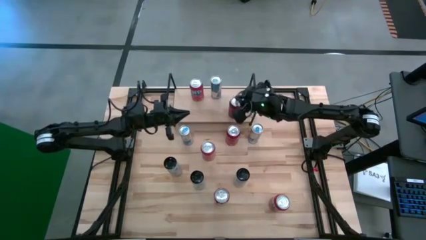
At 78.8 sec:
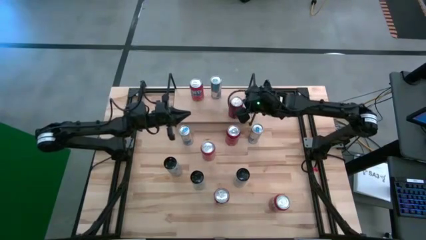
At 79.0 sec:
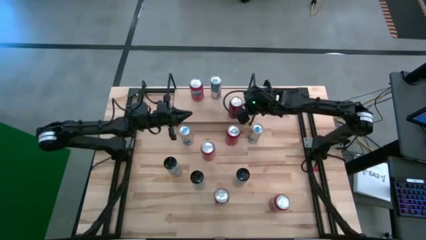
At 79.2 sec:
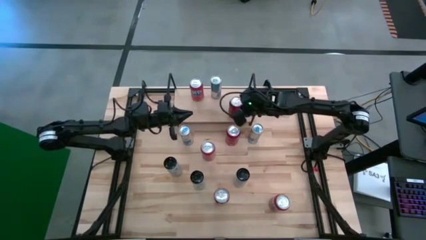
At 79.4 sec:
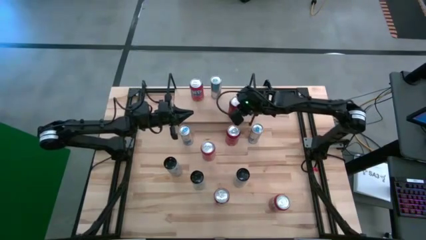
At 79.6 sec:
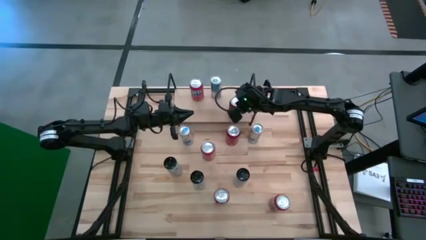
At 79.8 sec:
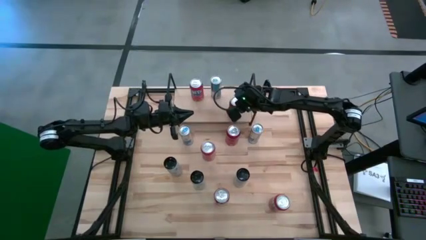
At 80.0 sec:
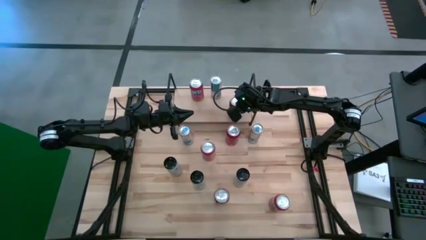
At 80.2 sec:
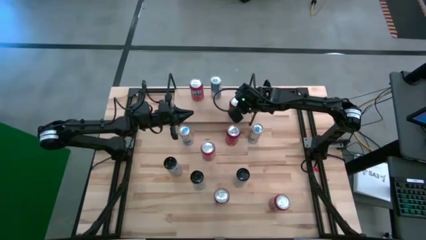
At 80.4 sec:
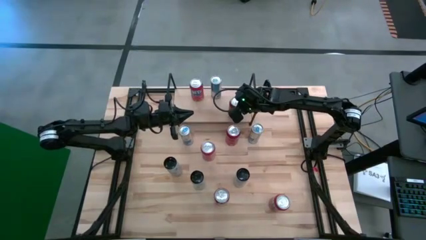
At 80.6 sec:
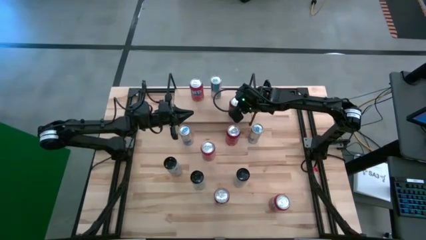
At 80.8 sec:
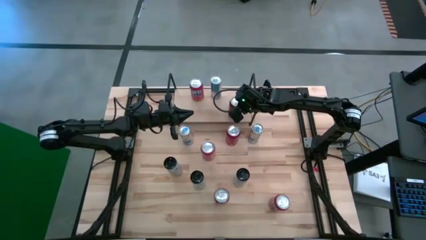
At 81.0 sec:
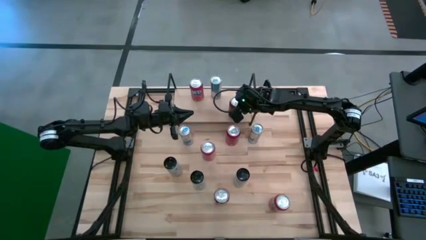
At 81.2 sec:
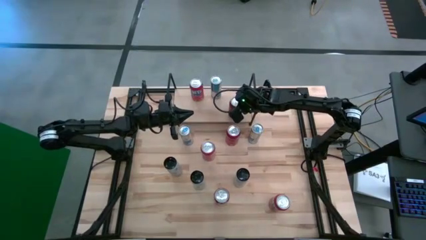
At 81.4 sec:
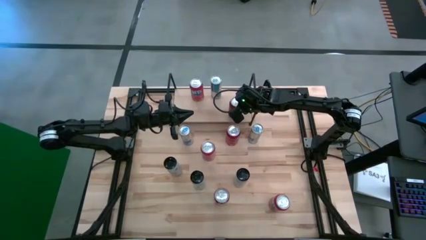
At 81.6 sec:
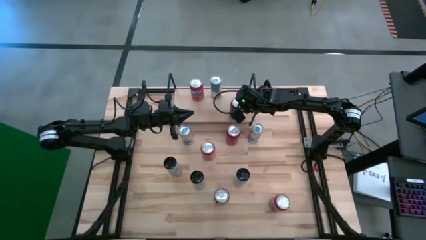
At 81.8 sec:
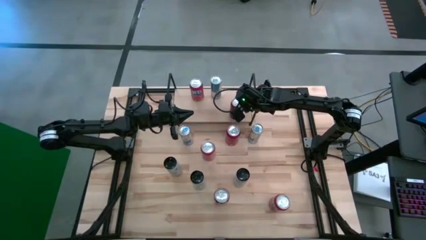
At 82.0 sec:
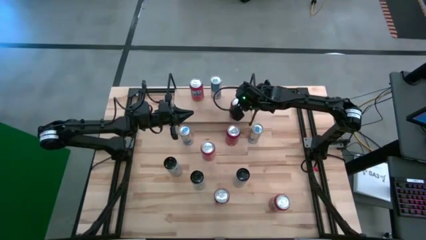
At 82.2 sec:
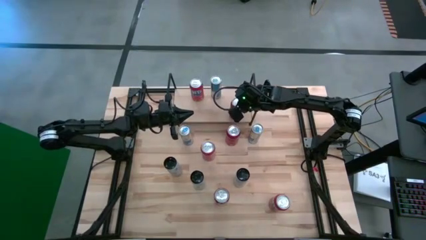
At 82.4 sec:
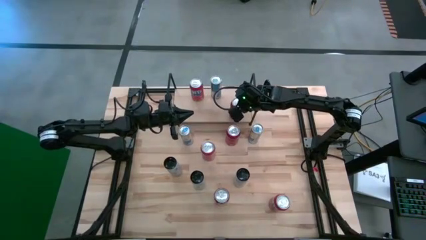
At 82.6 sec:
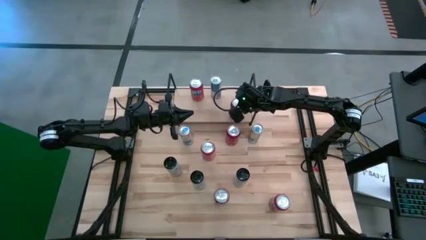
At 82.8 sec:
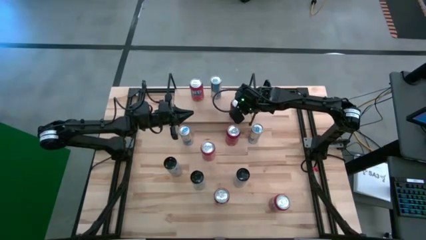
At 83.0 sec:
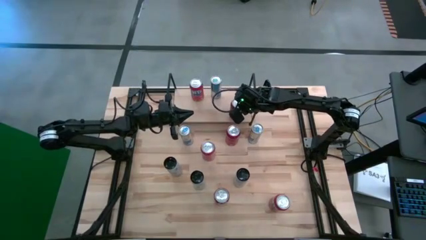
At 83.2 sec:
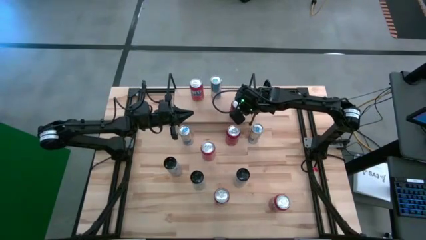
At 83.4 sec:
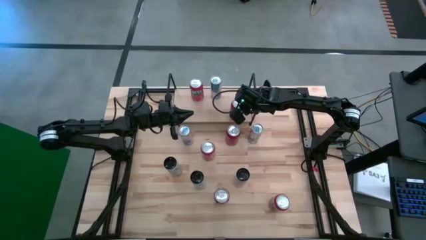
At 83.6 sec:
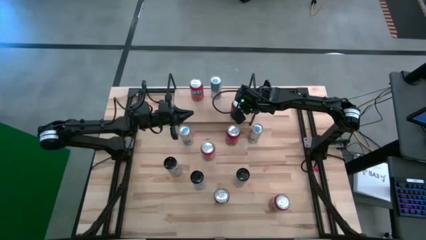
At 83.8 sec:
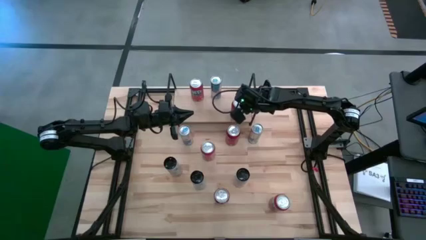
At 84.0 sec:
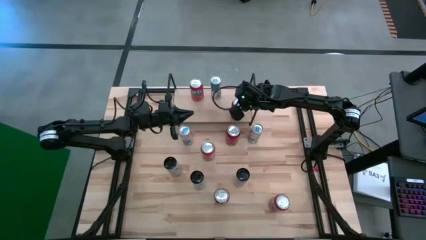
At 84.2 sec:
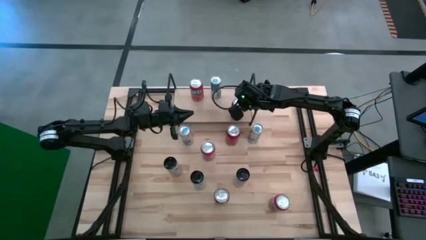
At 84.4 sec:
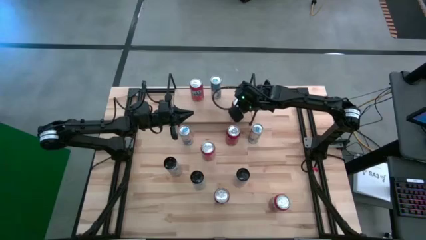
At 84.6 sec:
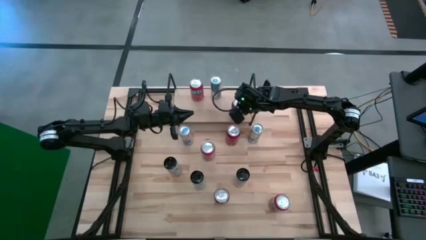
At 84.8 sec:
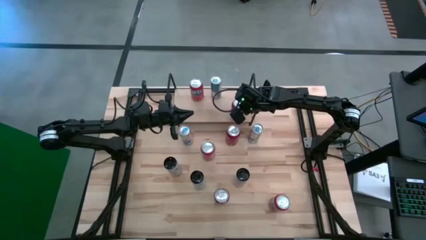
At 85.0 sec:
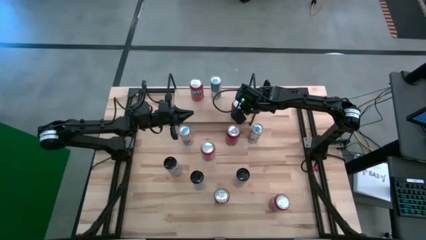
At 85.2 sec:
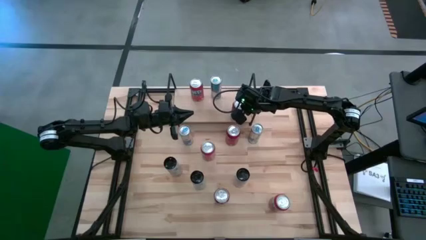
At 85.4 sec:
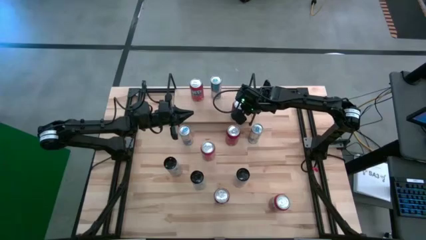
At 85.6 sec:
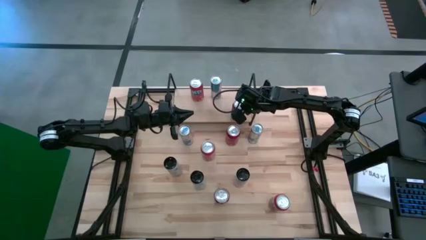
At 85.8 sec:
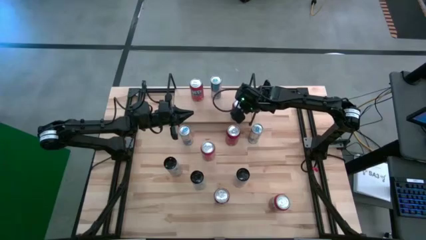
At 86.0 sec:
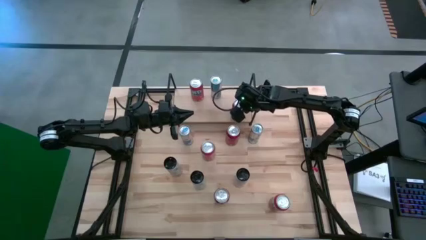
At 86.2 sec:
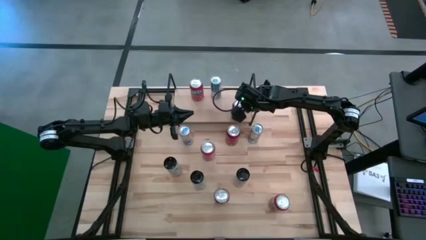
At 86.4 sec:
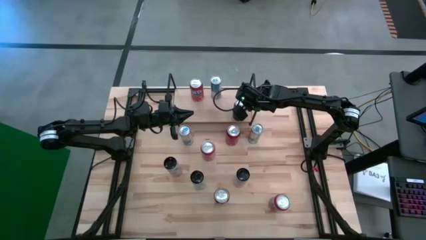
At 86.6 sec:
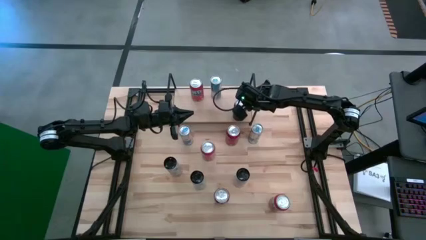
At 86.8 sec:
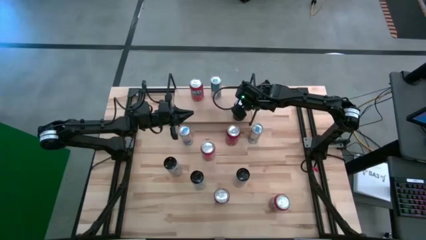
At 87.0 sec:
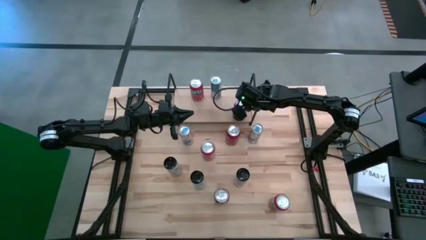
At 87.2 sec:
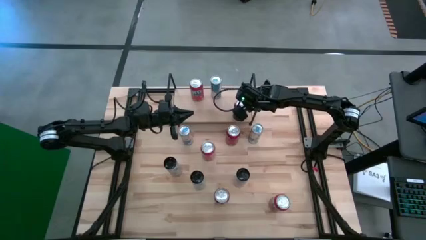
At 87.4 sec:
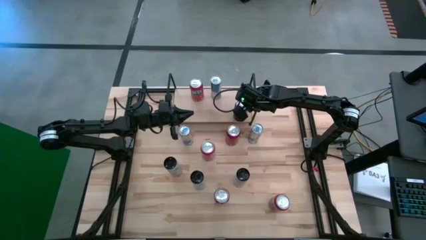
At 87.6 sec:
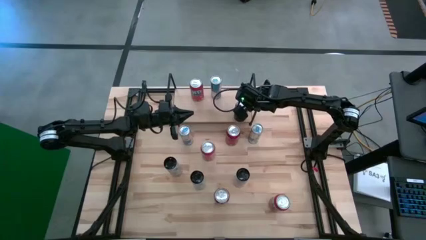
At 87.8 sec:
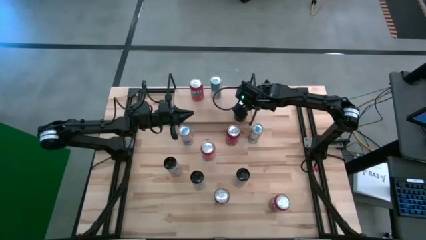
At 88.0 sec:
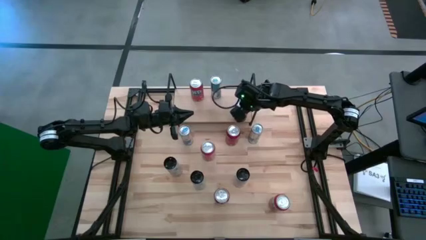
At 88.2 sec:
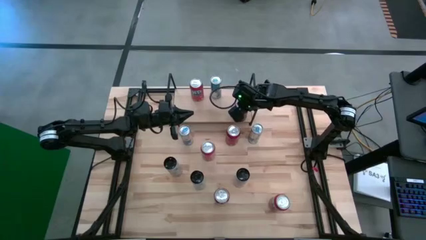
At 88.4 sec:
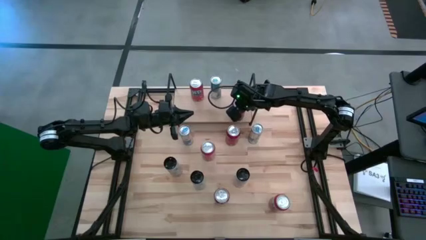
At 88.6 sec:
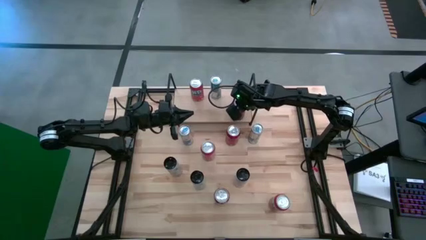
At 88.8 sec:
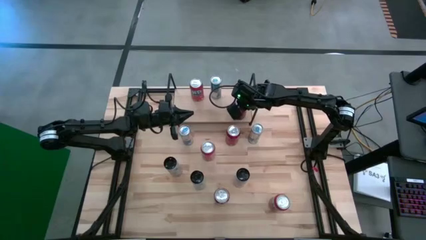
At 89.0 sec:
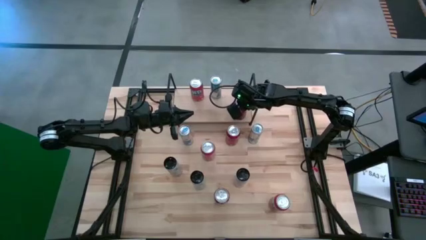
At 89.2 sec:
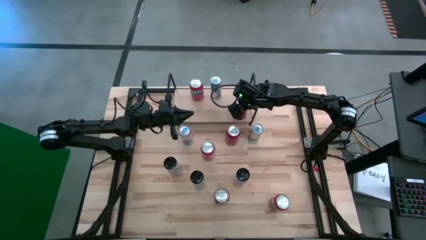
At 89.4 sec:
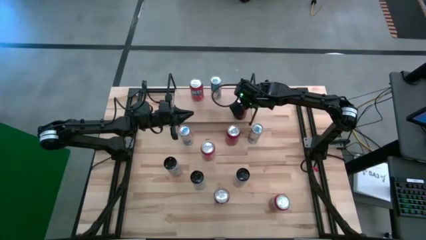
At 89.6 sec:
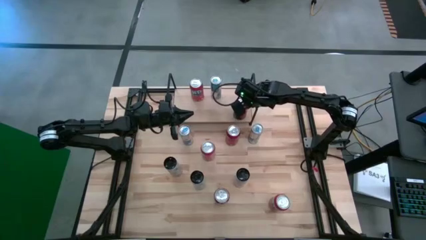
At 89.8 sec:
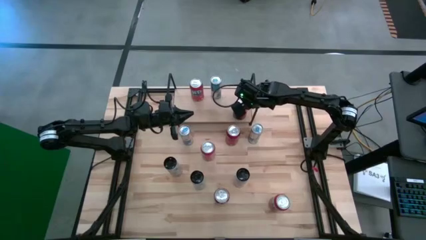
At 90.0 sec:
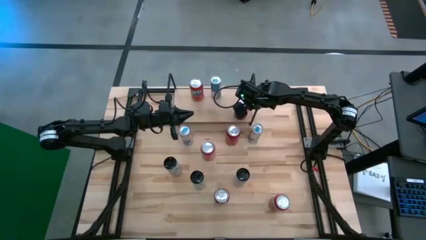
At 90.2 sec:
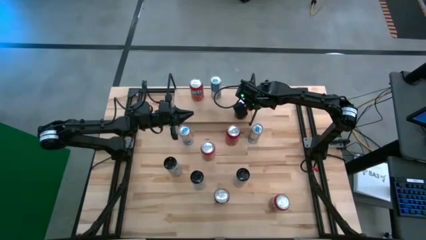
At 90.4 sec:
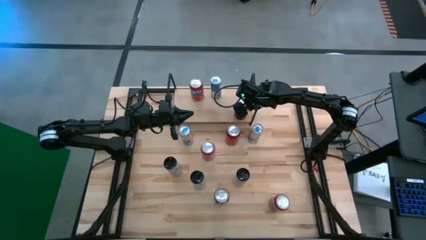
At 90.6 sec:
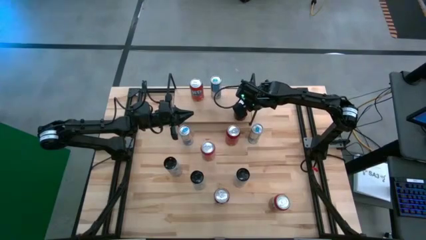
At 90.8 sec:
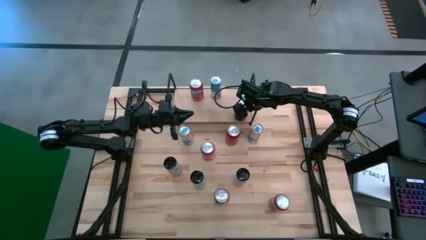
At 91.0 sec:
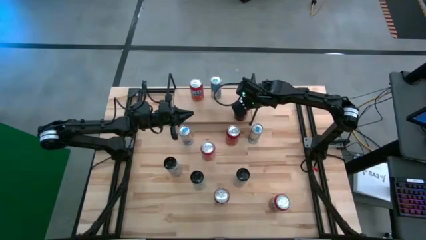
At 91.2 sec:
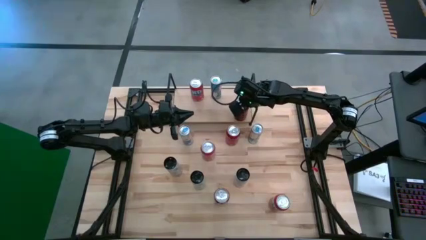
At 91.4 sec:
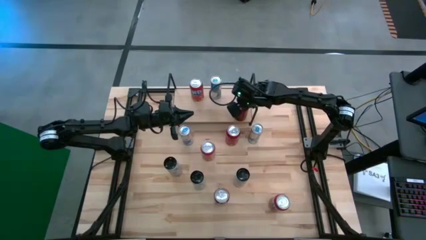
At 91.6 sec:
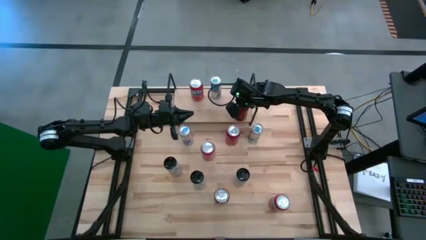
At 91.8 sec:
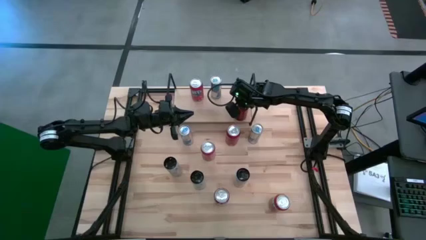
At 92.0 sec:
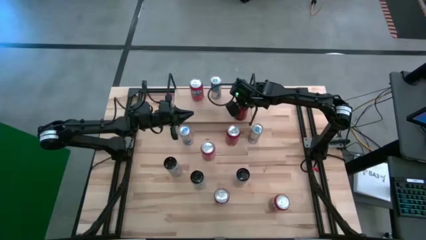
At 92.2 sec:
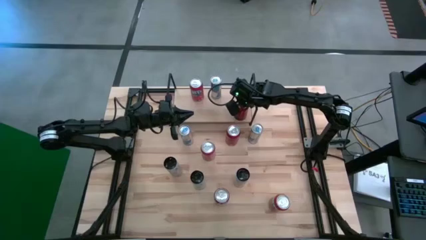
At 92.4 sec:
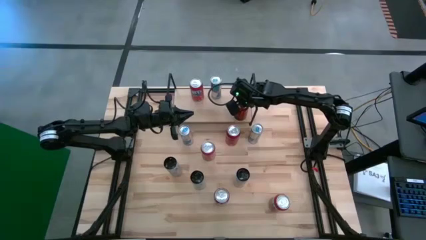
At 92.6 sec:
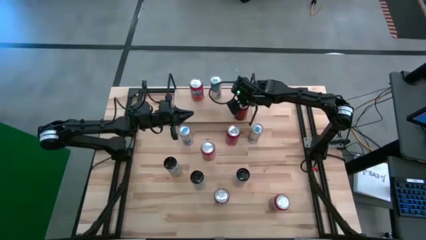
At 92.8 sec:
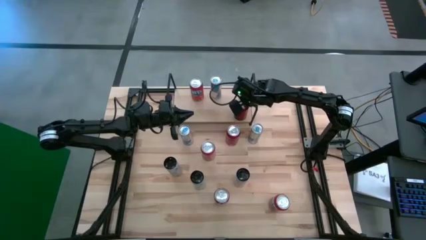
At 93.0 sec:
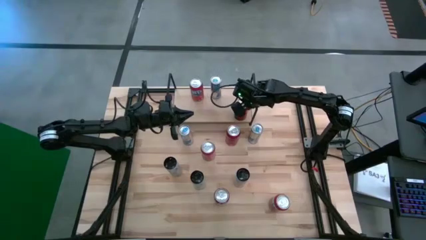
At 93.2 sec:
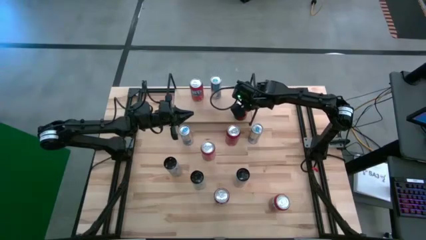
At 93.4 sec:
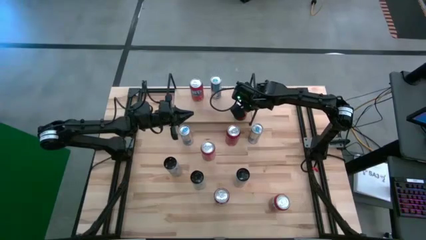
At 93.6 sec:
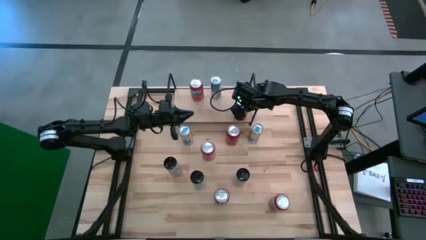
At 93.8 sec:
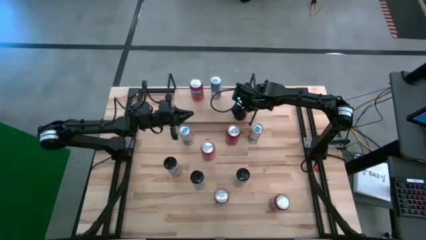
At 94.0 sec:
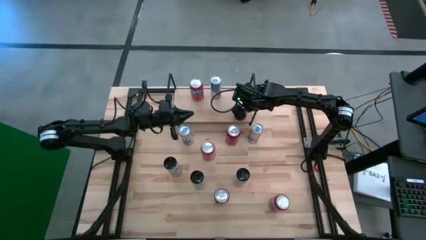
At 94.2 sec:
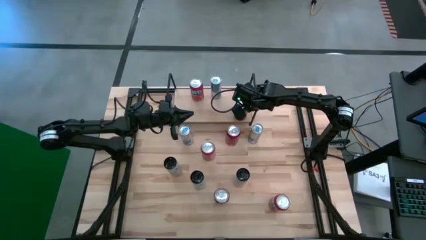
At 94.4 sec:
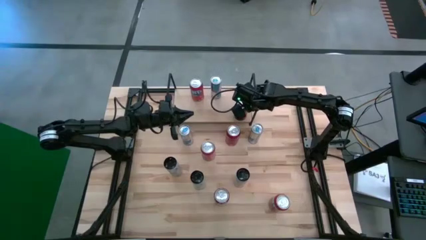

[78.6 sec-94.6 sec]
Task: Place canned beverage on shelf
Put the bottom right red soda can on the shelf
